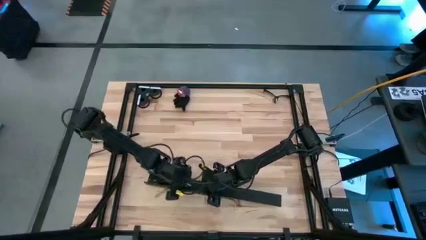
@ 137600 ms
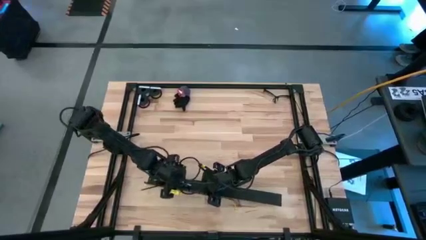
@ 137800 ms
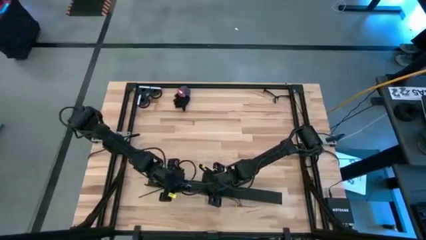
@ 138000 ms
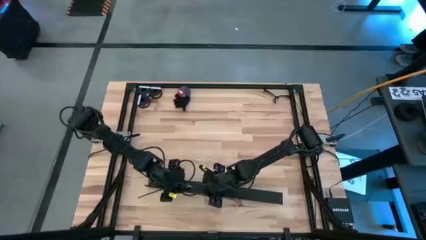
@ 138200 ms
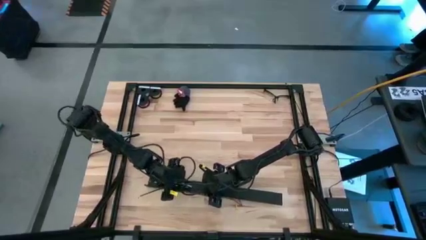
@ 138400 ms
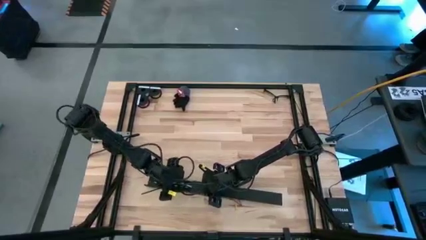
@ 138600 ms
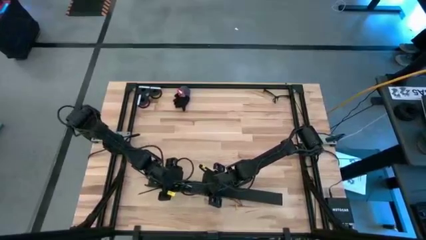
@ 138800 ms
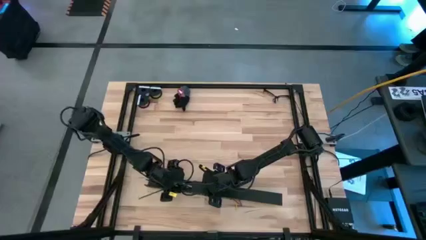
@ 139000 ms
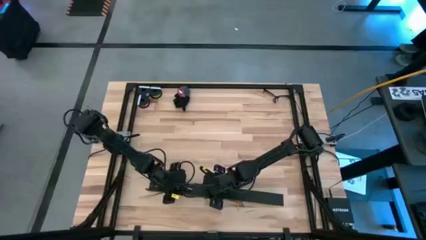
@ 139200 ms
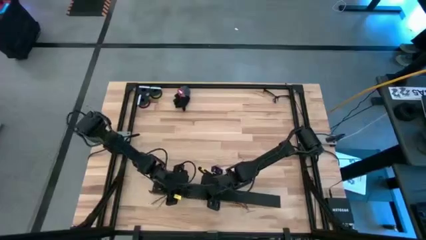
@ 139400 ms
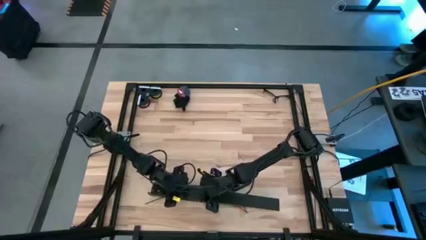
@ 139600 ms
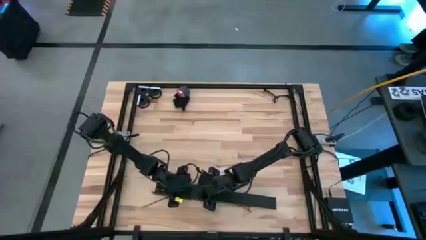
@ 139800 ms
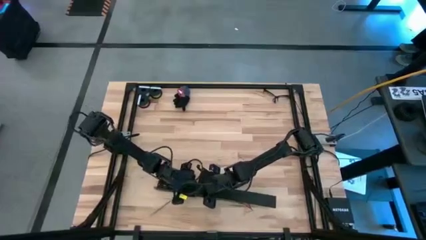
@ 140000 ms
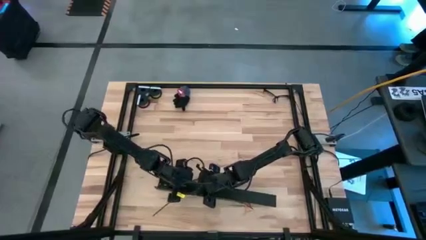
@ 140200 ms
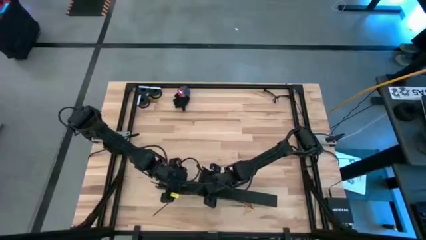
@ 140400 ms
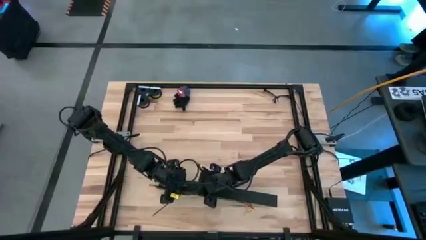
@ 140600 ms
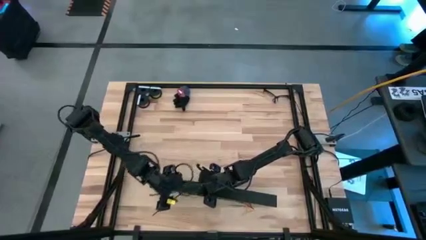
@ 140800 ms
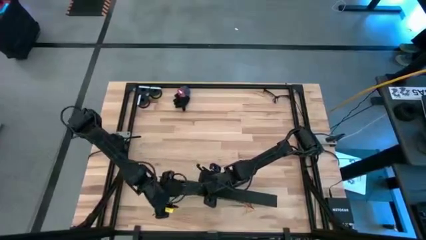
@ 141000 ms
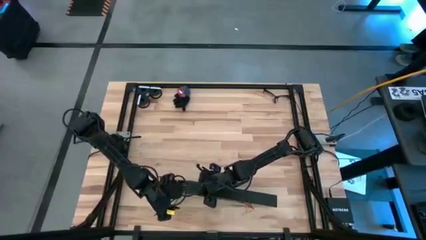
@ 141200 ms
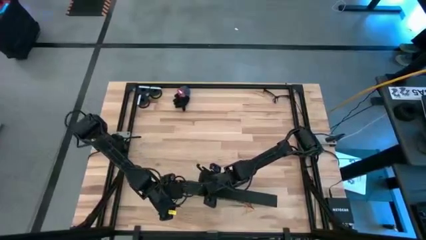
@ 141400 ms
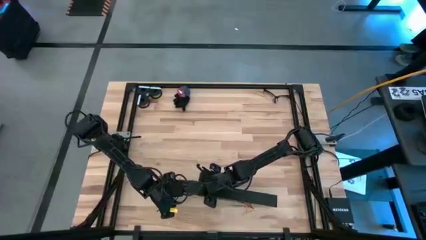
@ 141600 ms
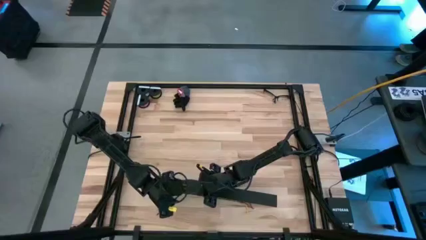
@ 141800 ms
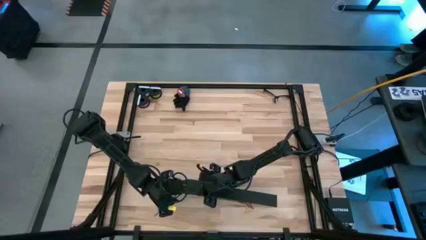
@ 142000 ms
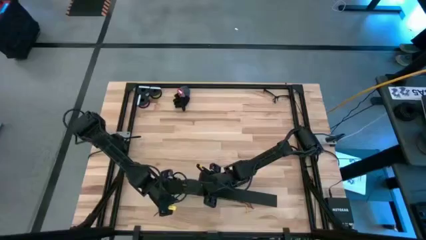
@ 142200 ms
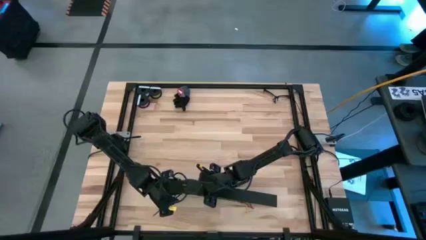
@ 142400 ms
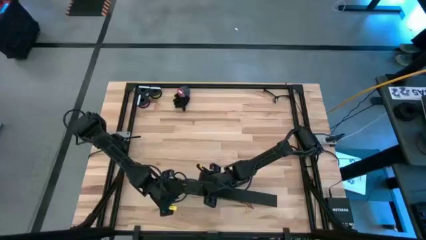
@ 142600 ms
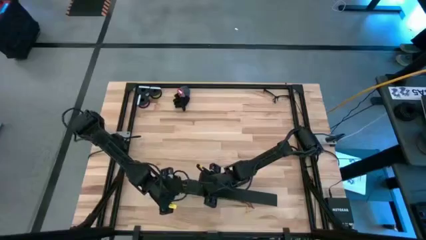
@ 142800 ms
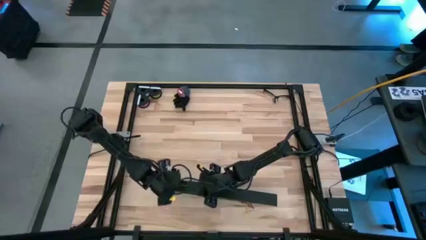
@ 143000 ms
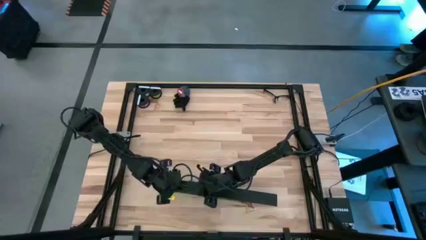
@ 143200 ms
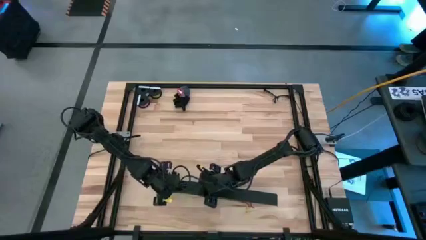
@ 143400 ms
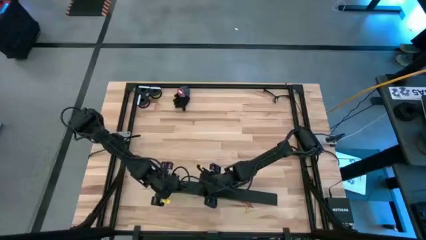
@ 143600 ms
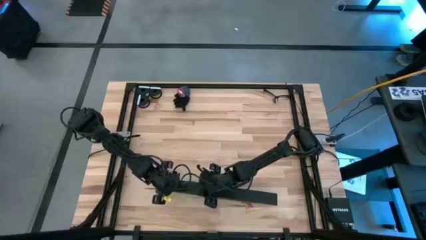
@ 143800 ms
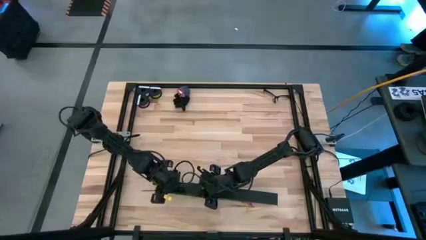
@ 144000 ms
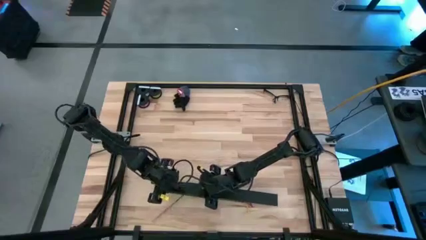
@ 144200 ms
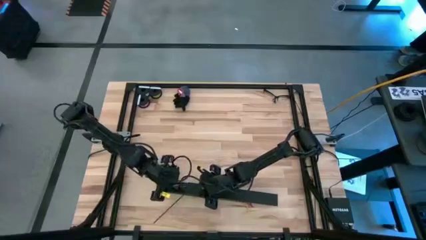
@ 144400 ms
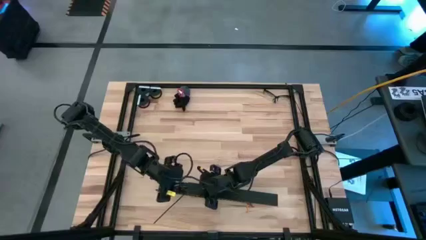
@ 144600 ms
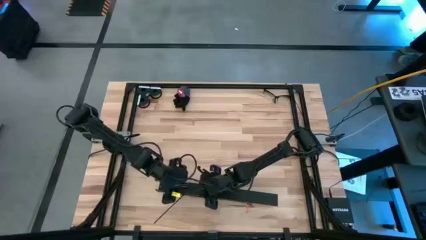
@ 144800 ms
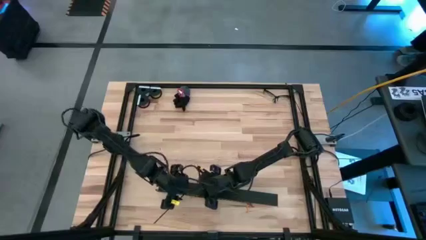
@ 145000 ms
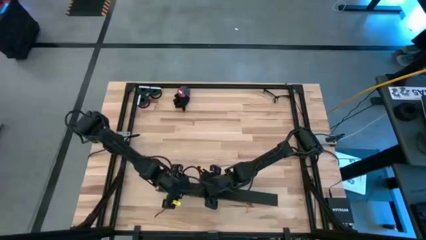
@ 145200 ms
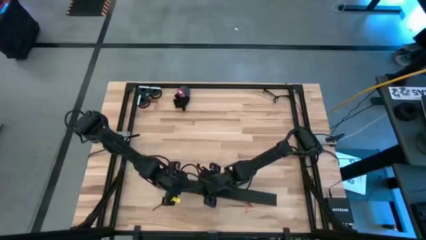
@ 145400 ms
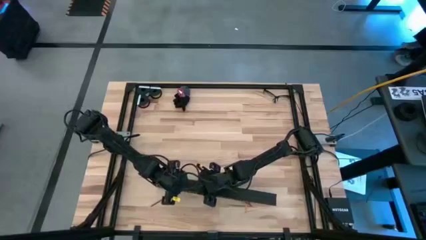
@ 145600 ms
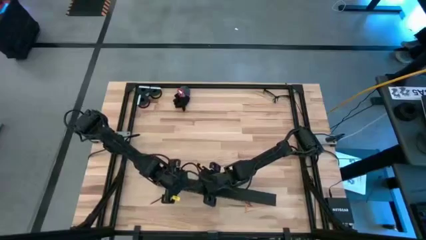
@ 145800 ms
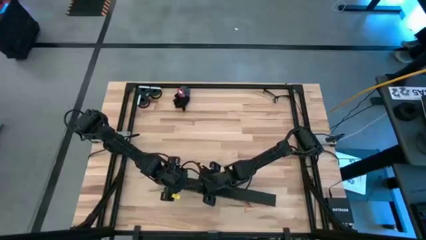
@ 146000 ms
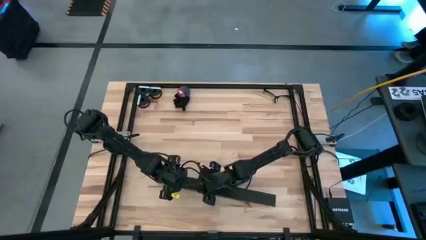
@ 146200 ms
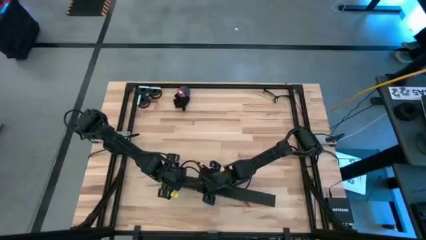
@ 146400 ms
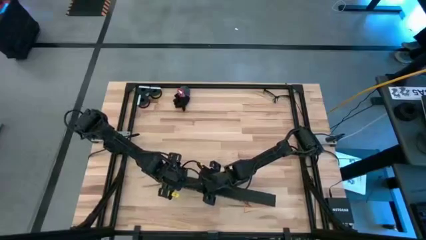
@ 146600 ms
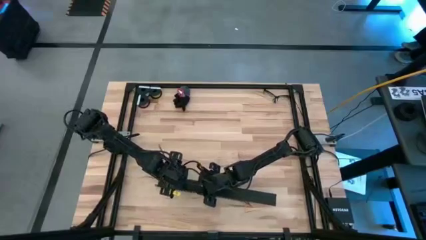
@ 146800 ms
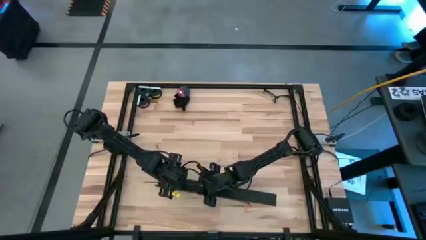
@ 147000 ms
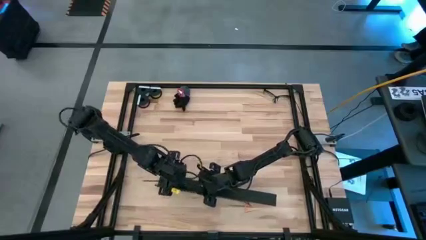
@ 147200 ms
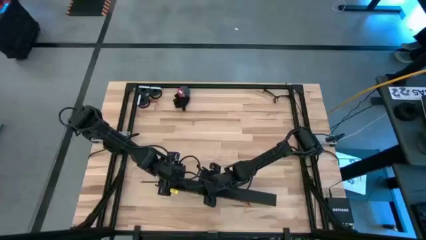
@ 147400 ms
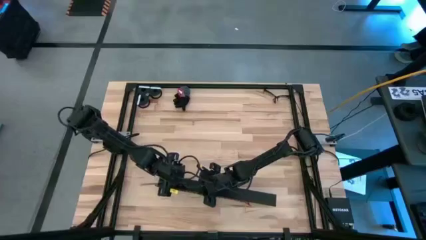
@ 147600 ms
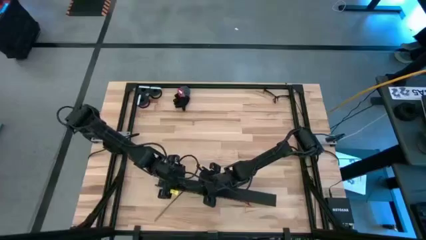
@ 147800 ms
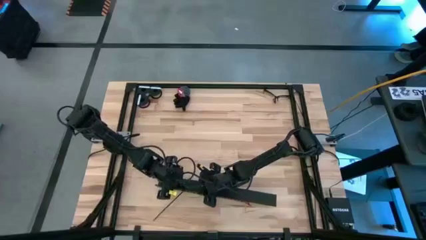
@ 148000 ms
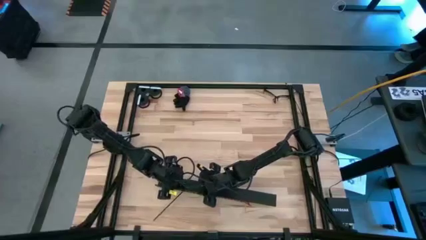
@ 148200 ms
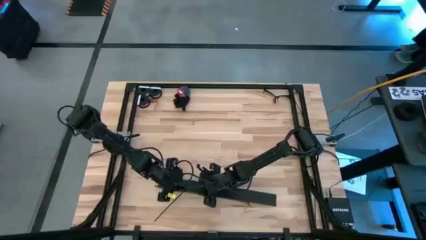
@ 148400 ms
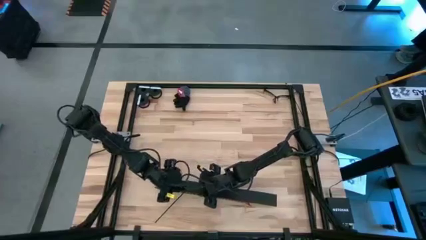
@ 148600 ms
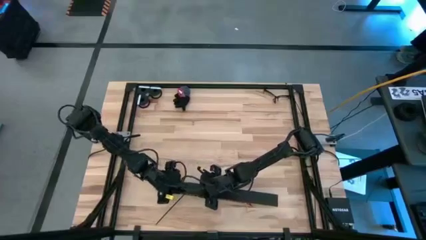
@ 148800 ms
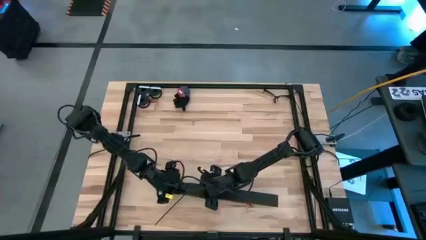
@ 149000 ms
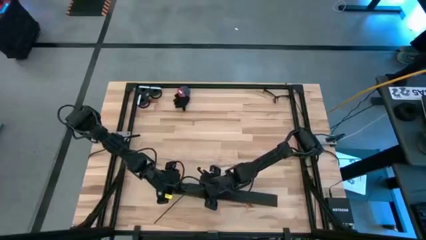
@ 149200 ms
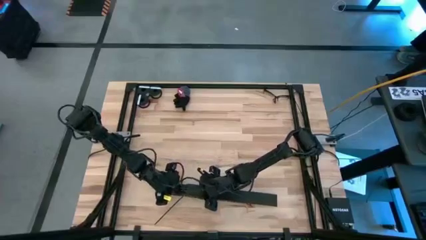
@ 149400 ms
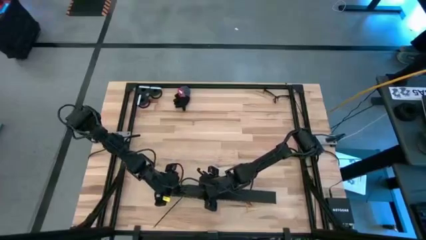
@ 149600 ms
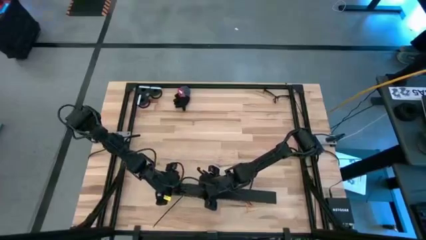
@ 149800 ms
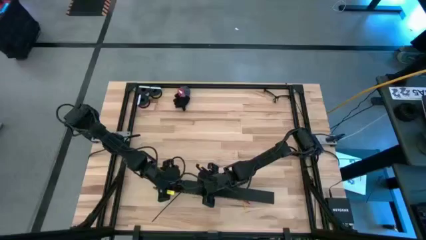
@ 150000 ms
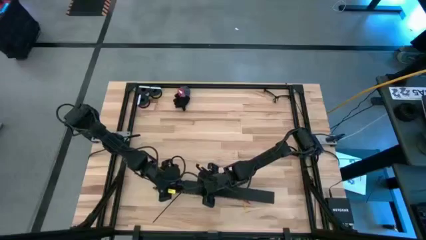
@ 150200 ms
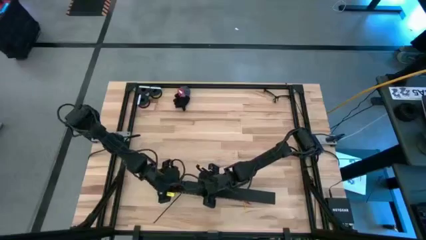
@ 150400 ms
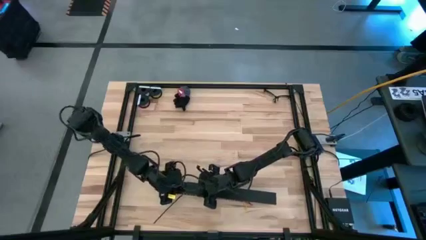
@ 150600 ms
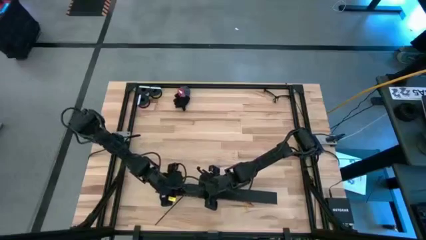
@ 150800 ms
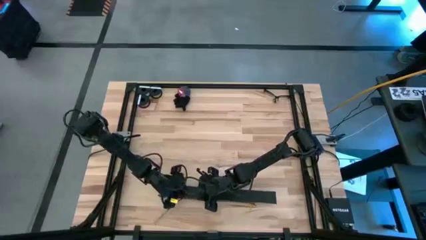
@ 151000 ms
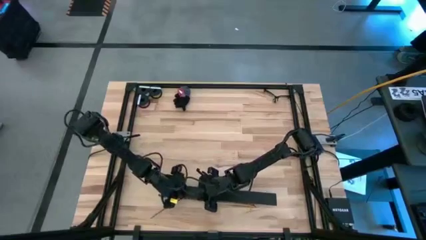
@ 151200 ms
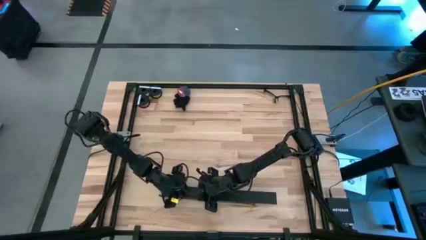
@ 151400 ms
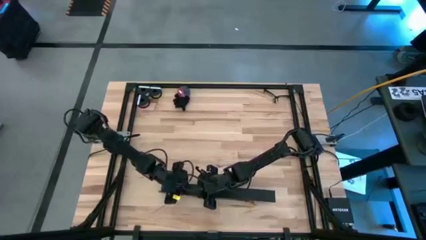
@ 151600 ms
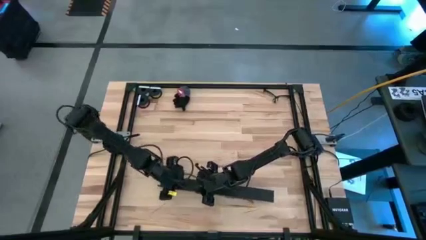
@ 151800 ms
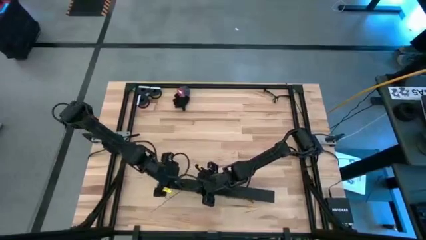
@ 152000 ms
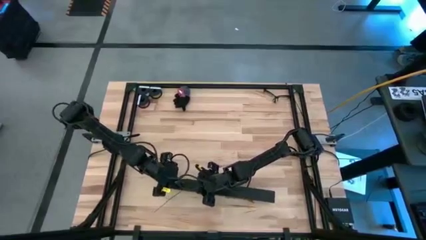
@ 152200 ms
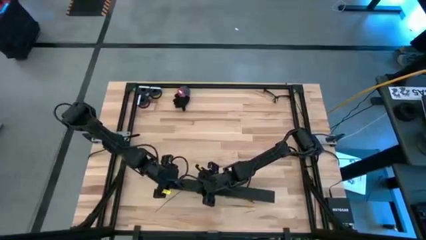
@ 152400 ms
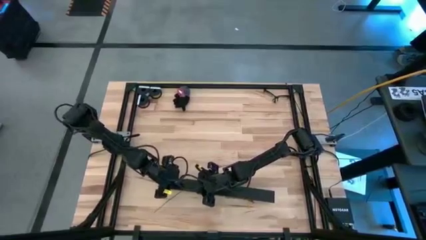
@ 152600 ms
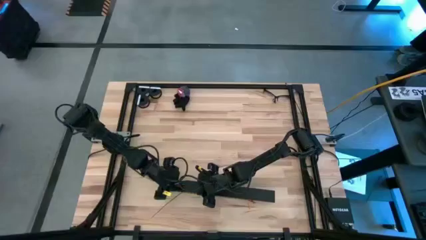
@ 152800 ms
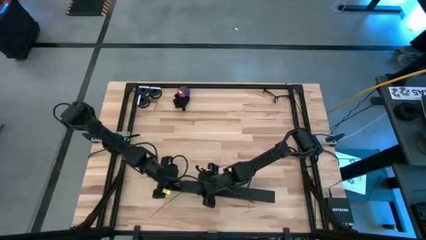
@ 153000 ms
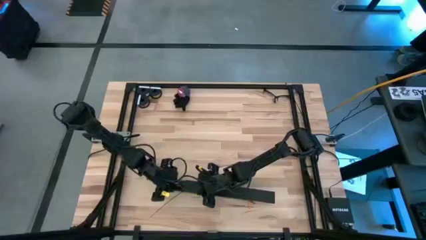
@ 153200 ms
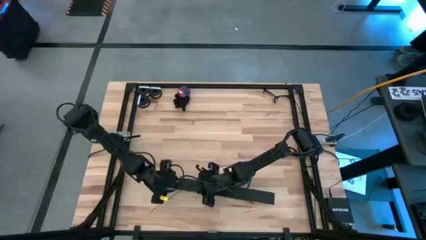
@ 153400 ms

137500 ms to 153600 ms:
Task: Ziptie cables
Close the black cable duct
